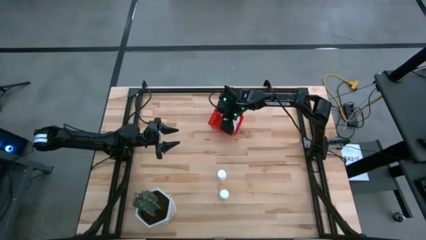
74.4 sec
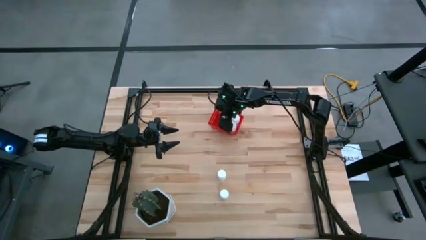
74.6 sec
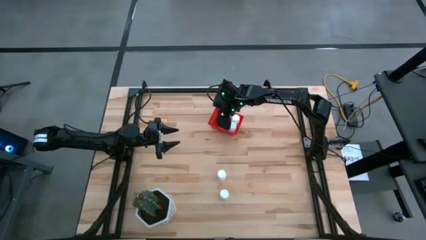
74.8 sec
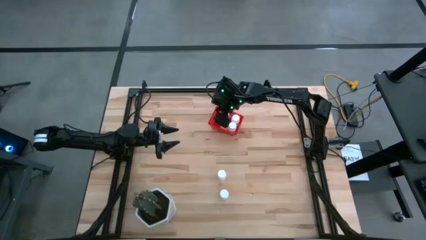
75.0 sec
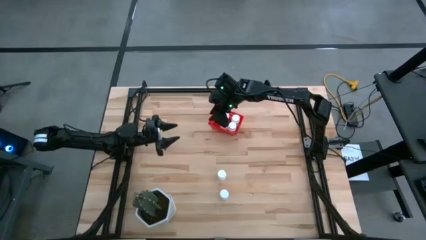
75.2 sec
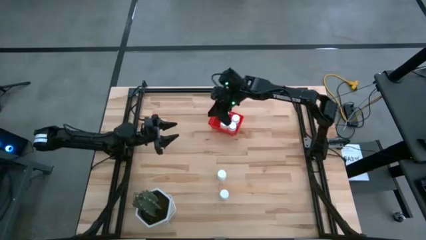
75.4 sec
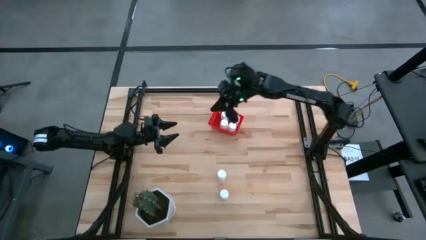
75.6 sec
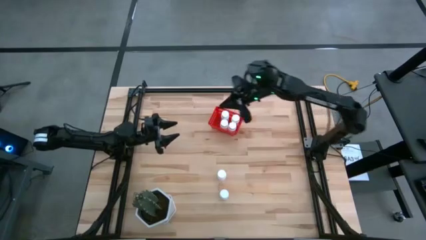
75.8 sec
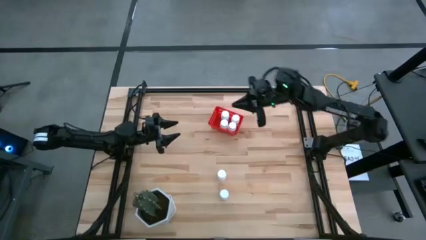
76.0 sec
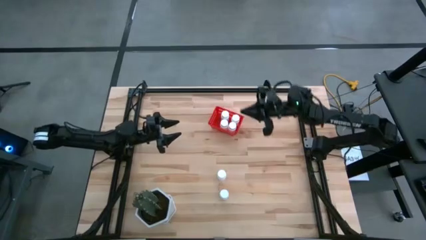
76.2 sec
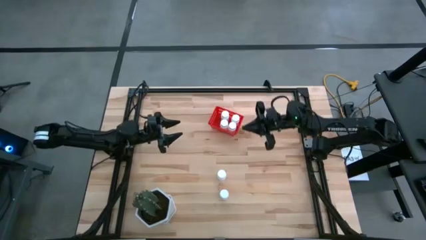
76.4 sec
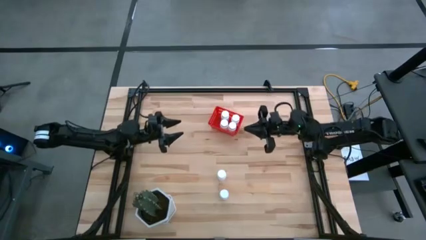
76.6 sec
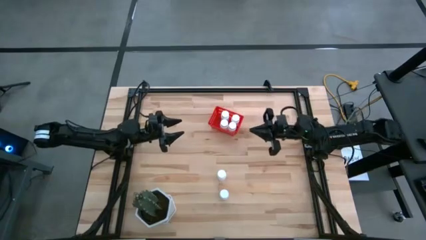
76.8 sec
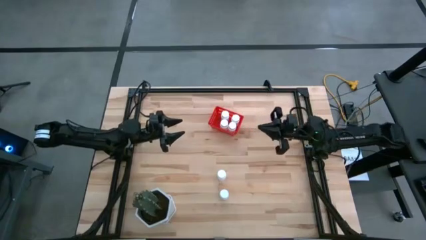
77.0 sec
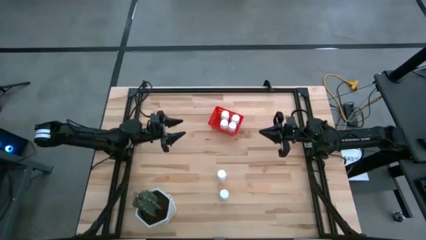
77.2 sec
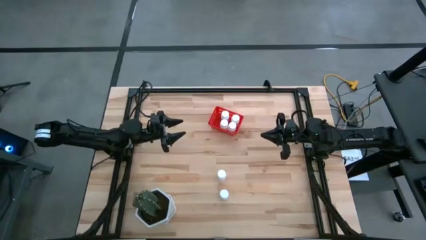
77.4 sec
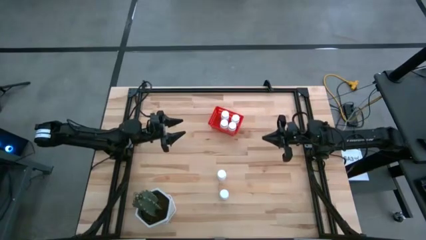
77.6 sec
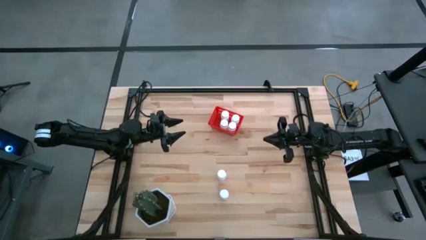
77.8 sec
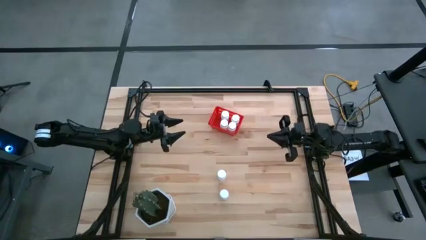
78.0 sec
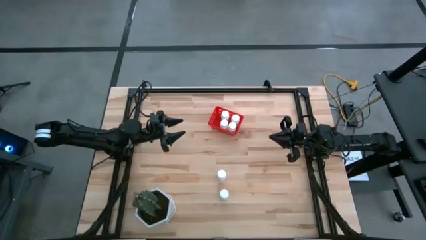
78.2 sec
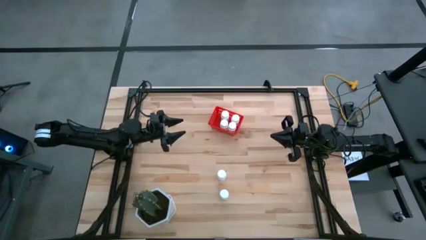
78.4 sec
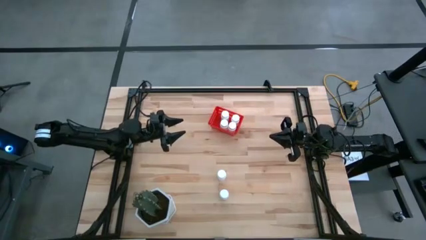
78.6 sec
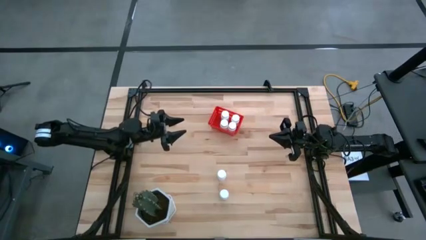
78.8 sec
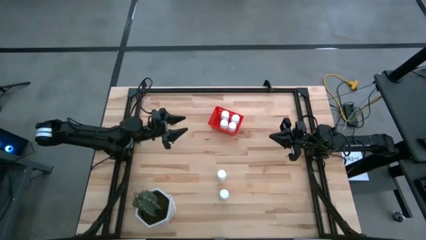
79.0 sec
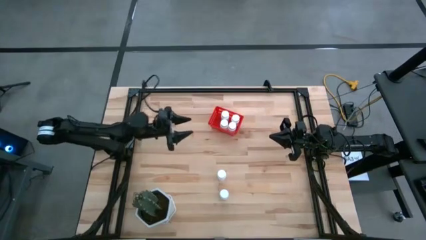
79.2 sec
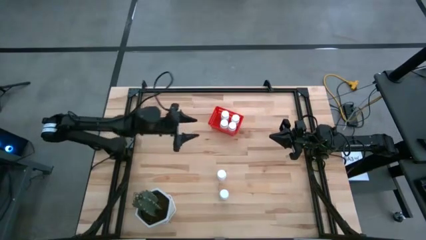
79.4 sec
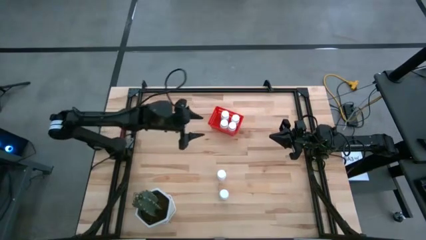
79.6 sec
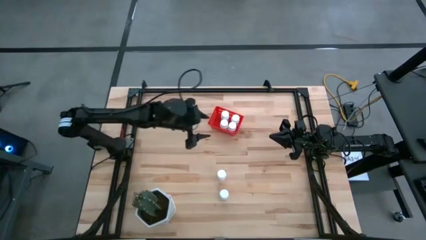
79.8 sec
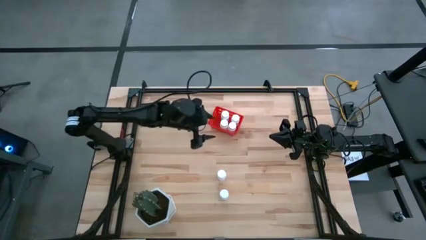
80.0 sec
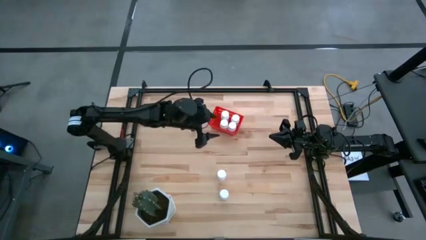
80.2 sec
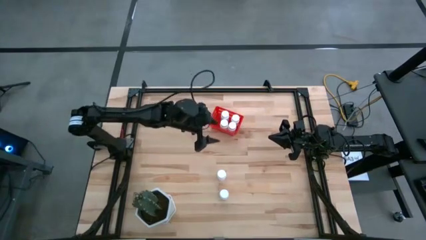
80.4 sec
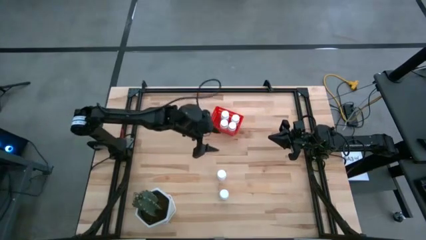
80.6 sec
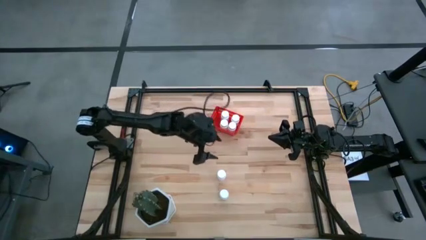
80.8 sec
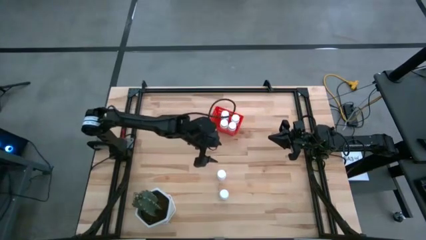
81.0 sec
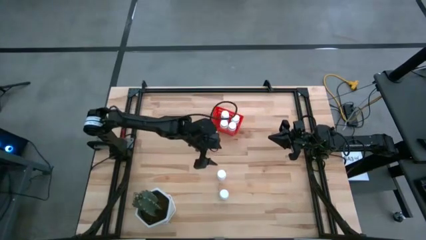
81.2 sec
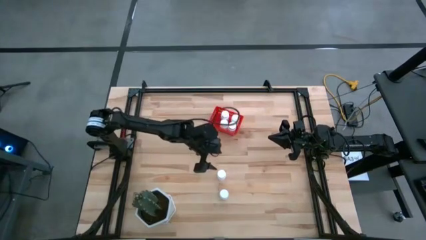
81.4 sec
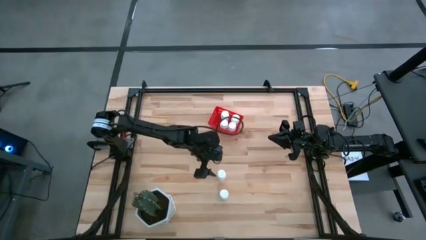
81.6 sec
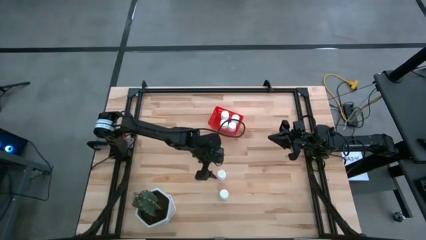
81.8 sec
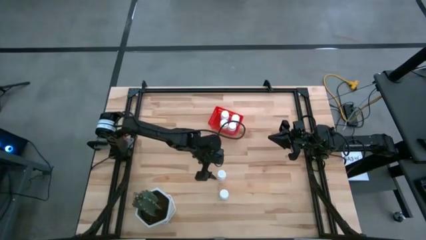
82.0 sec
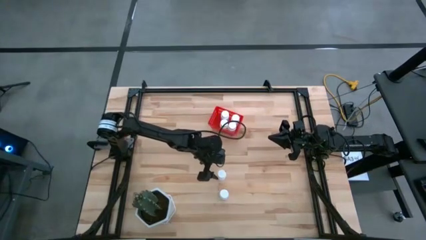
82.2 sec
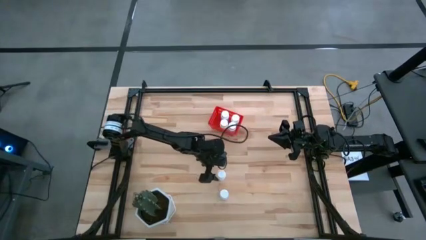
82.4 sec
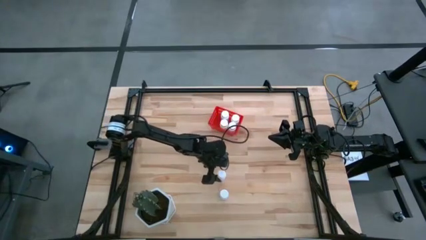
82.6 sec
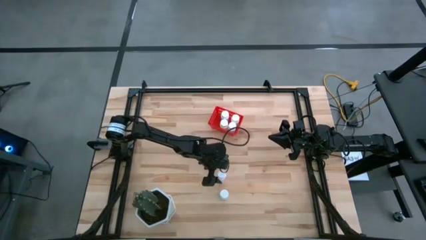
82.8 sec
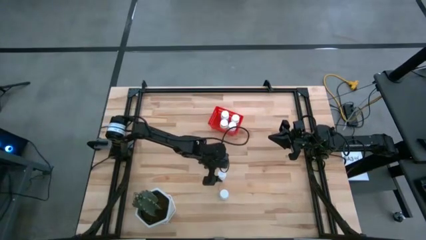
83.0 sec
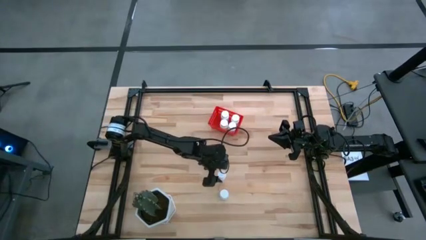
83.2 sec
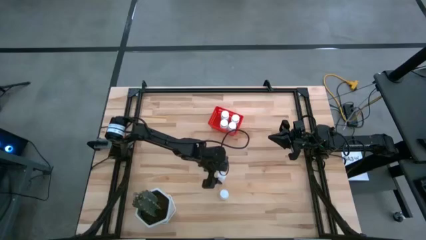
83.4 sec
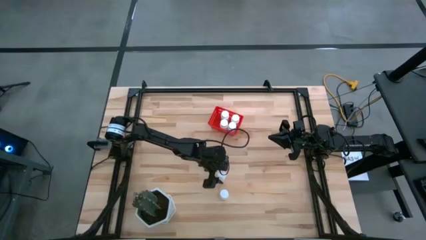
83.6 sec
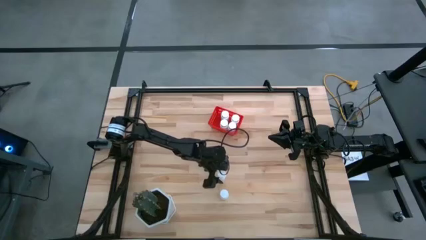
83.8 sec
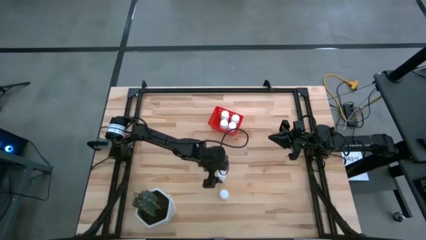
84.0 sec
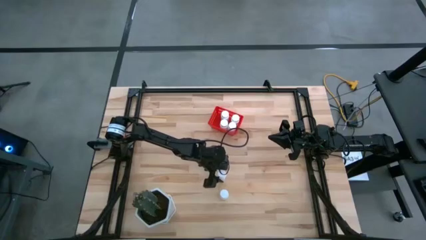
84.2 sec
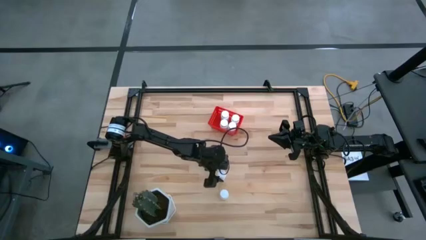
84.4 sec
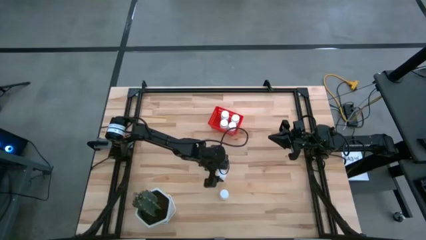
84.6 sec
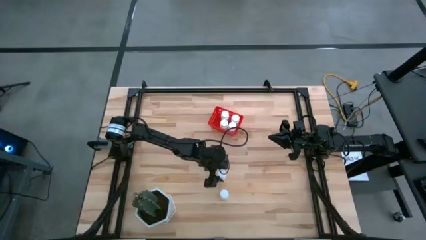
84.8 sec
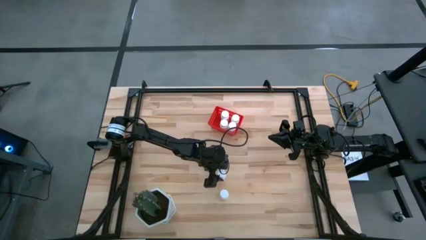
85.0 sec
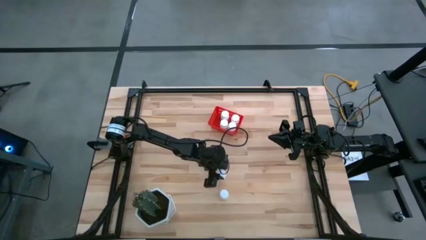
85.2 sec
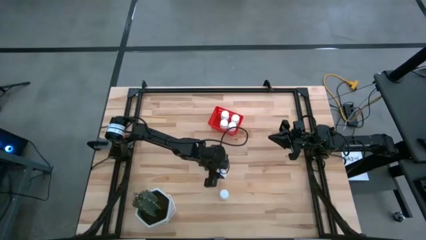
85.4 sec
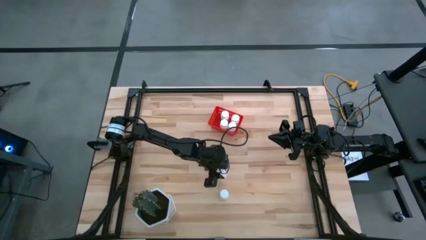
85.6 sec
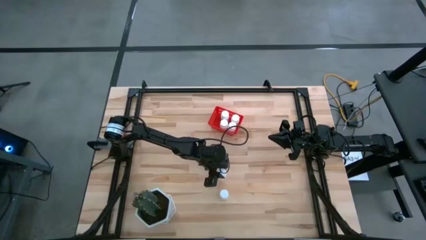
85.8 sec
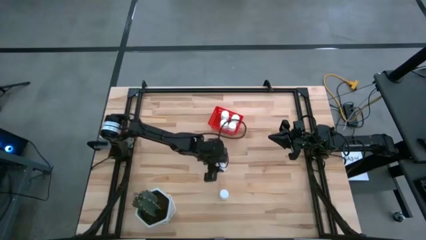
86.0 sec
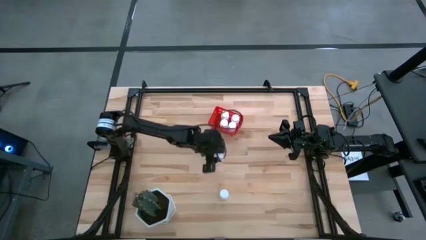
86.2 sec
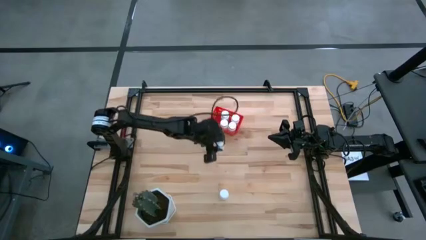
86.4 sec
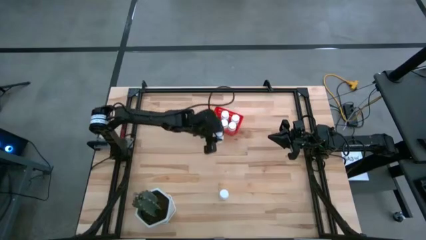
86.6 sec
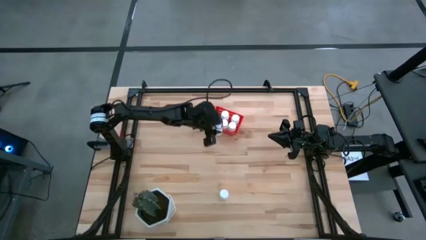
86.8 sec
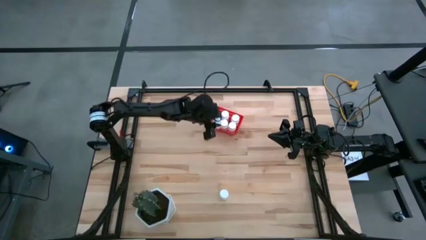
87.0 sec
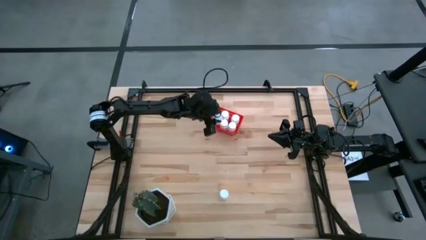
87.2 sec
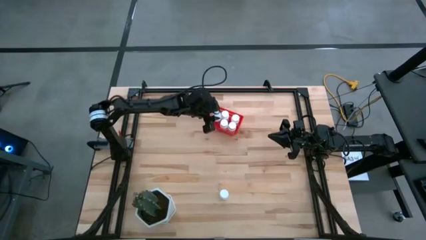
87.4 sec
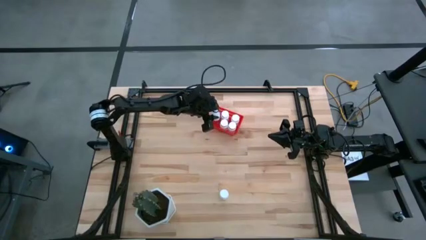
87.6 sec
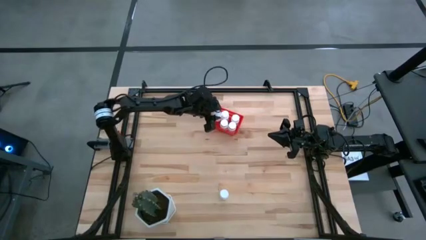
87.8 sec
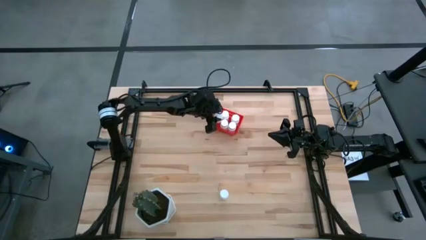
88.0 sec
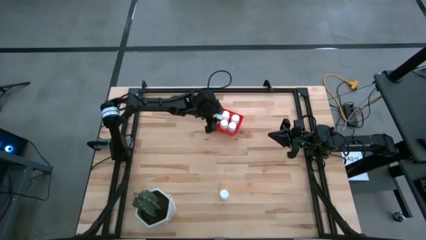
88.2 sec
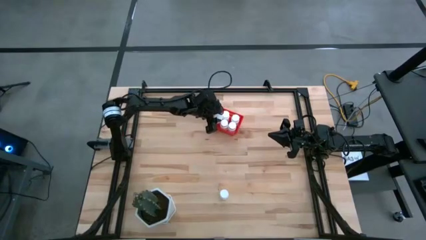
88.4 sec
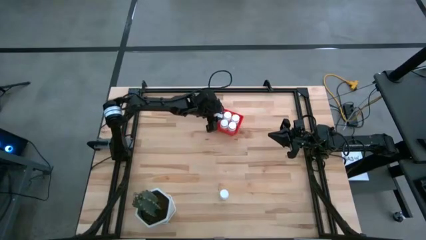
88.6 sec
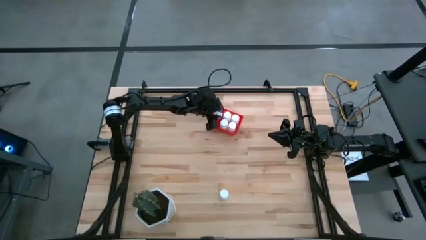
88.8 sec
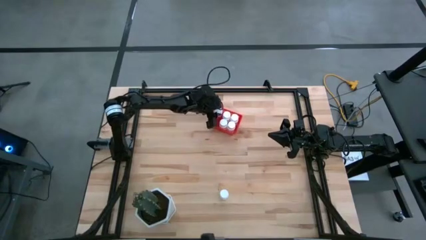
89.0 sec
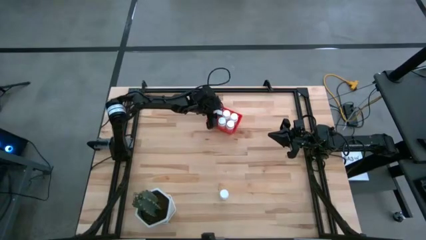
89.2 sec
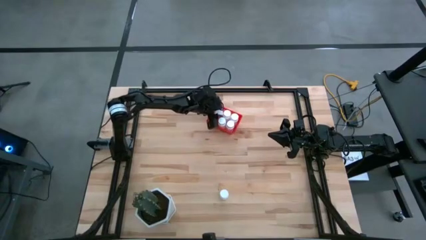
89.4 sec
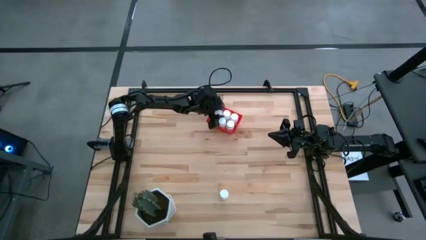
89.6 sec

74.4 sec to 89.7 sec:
Task: Pick and place pill bottles into a basket
Put the white pill bottle into the red bin
